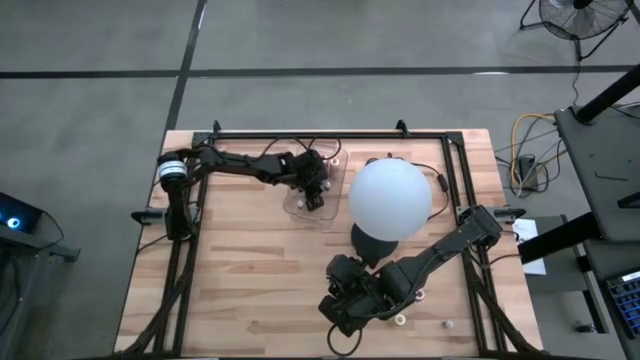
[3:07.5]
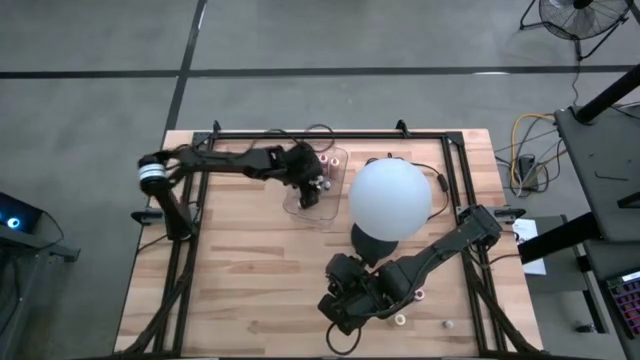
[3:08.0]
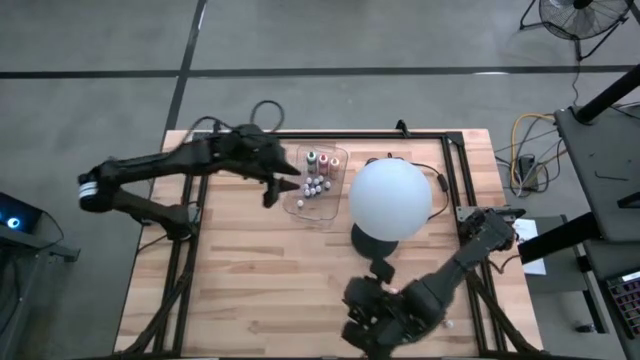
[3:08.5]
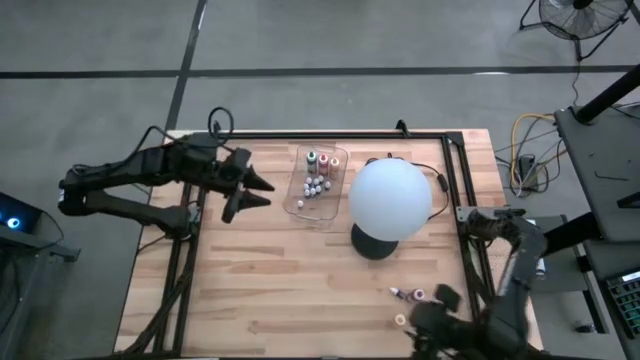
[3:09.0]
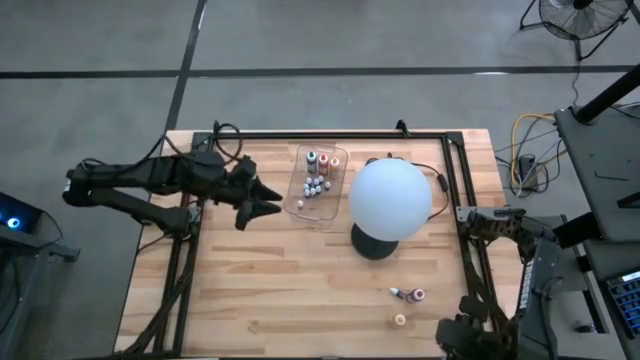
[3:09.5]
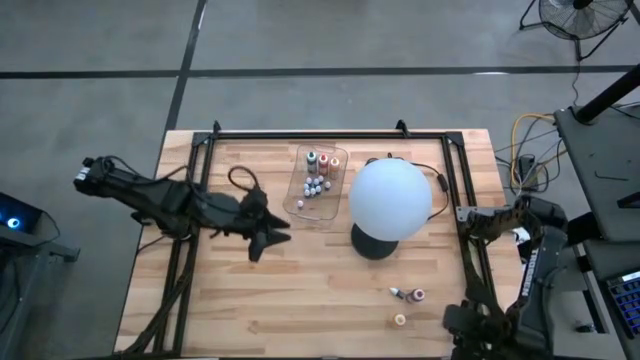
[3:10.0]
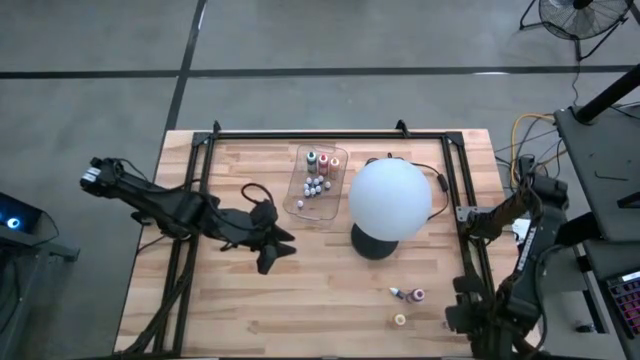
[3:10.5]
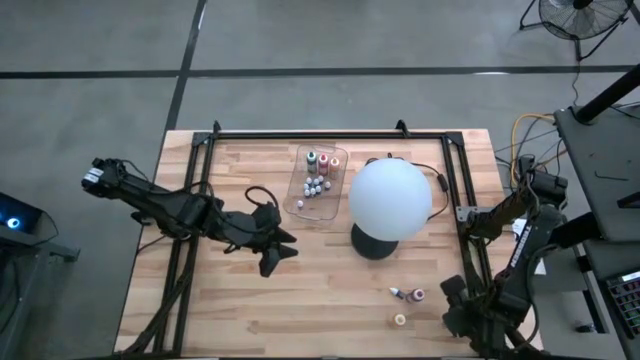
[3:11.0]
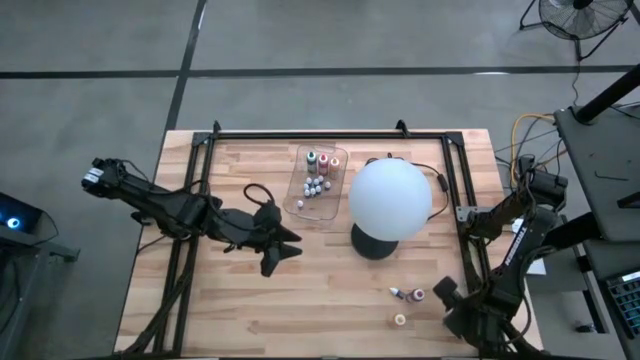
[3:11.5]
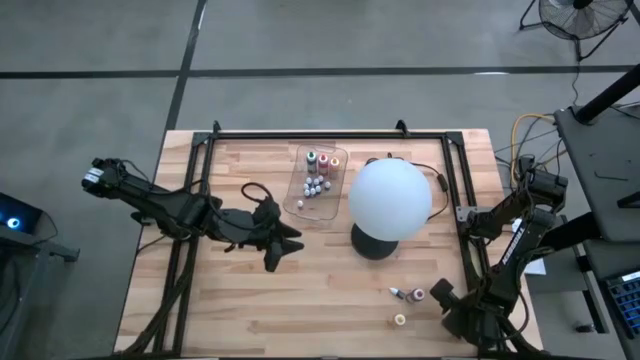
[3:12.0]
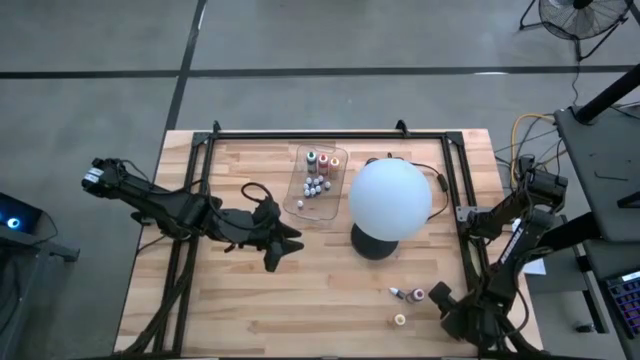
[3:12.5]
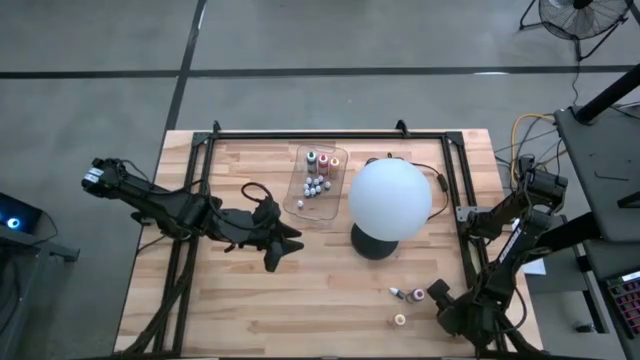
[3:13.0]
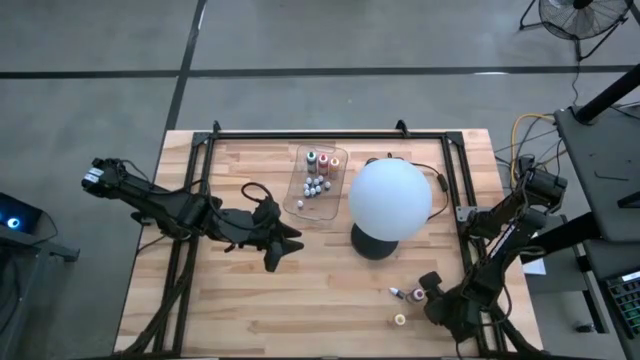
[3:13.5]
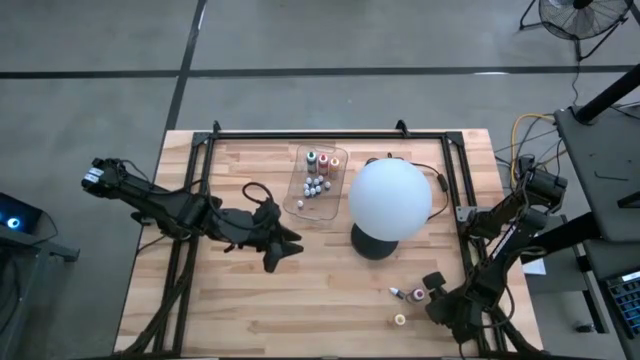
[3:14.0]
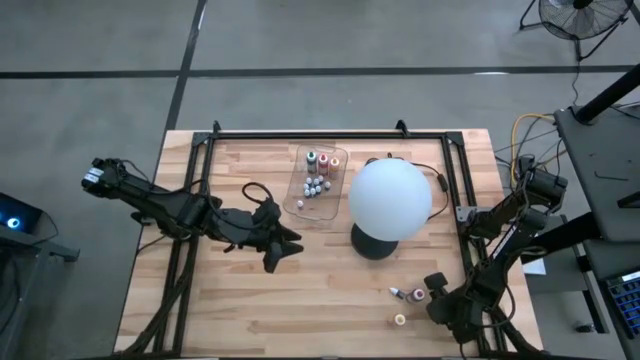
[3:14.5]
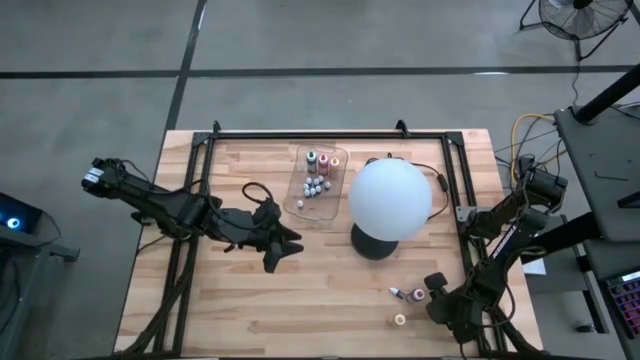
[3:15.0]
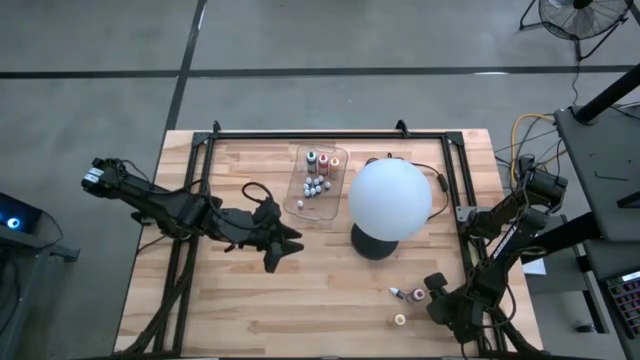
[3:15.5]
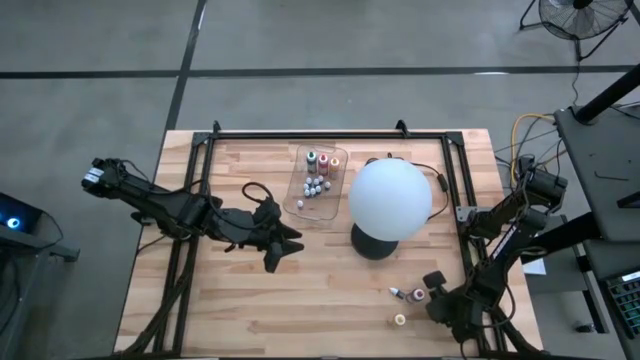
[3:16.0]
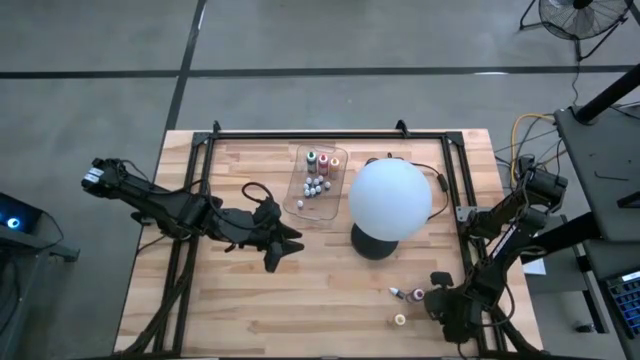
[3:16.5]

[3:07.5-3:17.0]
Task: Pick & Place food coloring
Put the small black food coloring bottle into the transparent bin

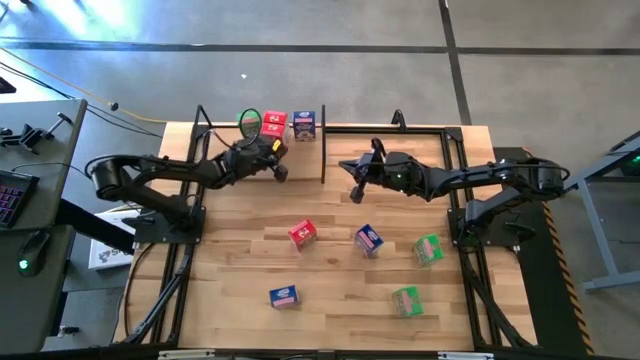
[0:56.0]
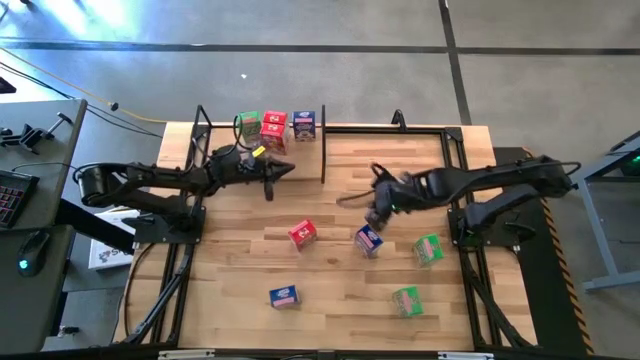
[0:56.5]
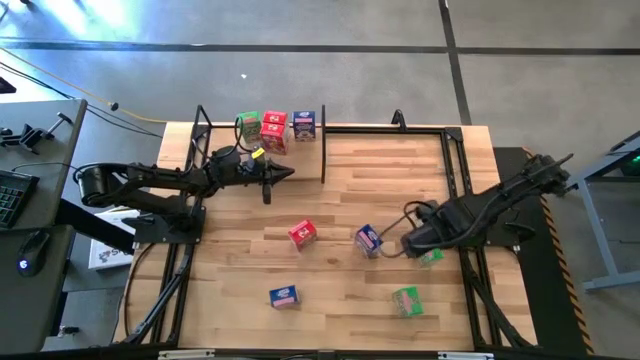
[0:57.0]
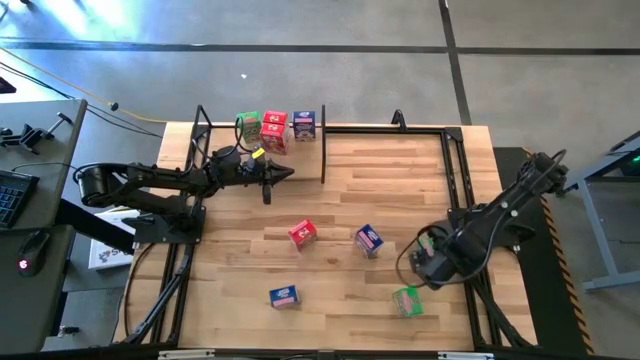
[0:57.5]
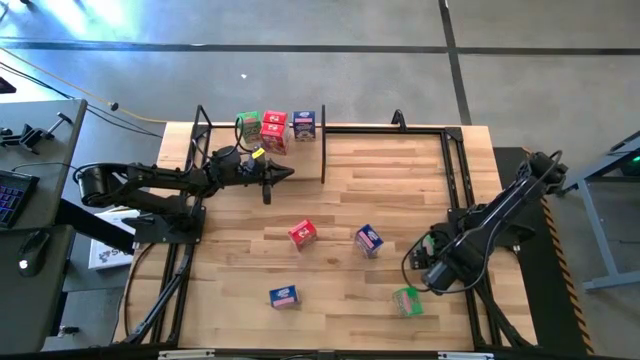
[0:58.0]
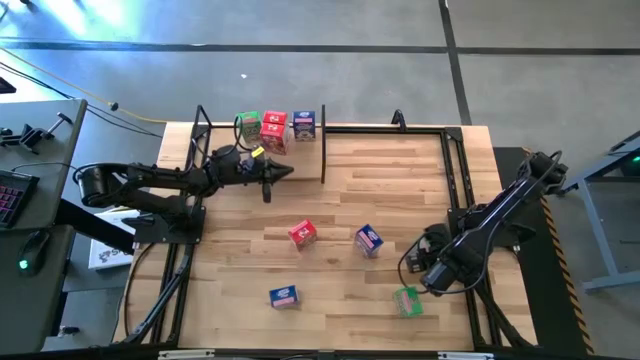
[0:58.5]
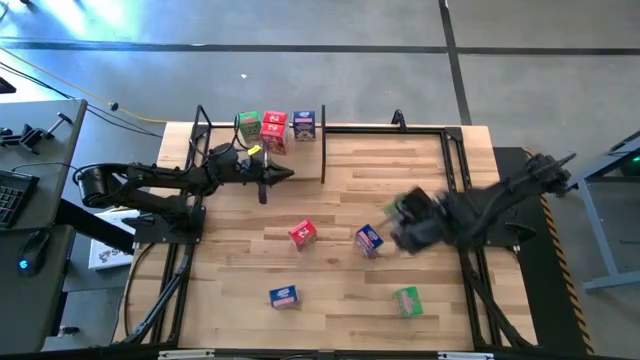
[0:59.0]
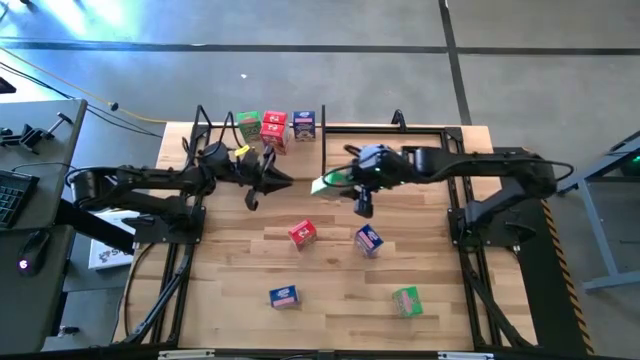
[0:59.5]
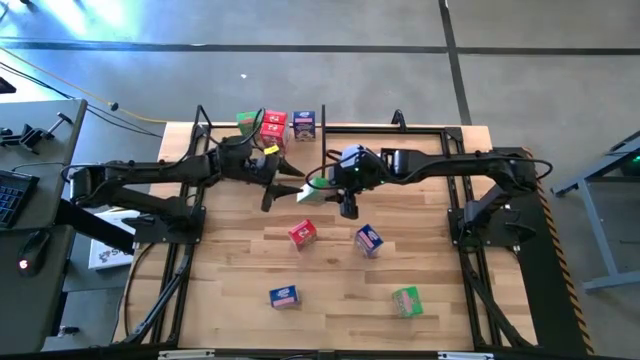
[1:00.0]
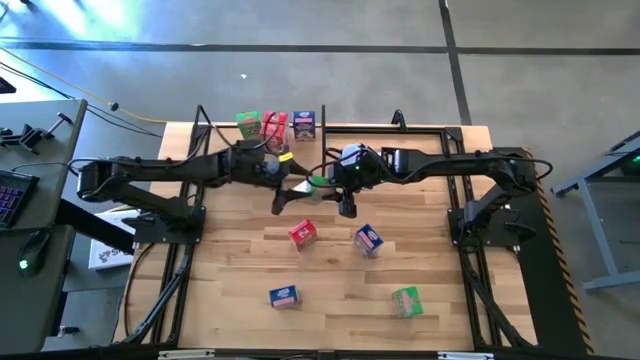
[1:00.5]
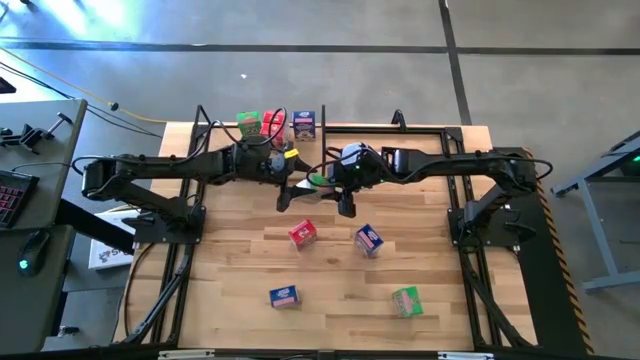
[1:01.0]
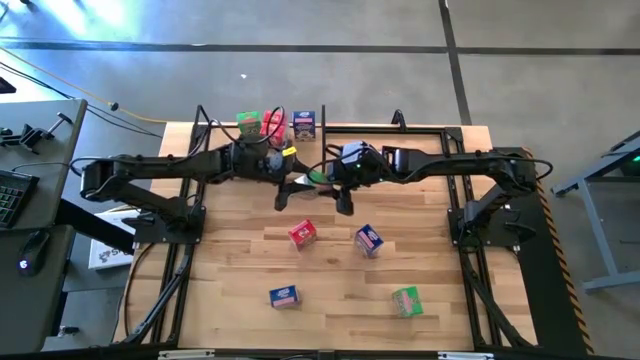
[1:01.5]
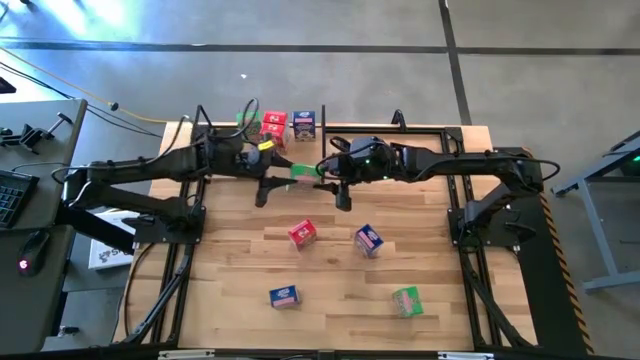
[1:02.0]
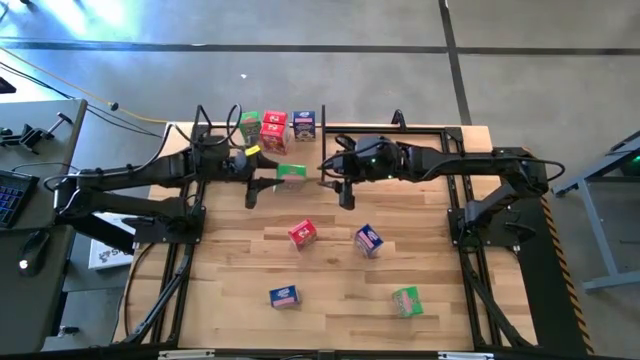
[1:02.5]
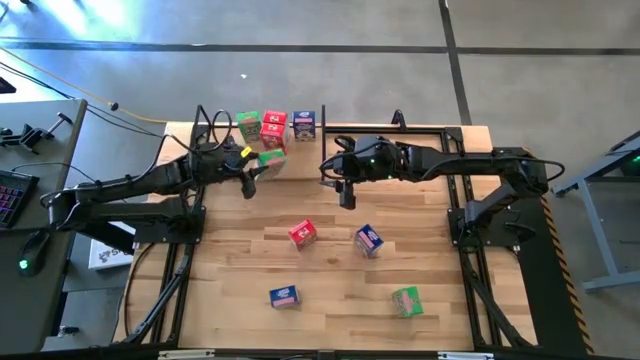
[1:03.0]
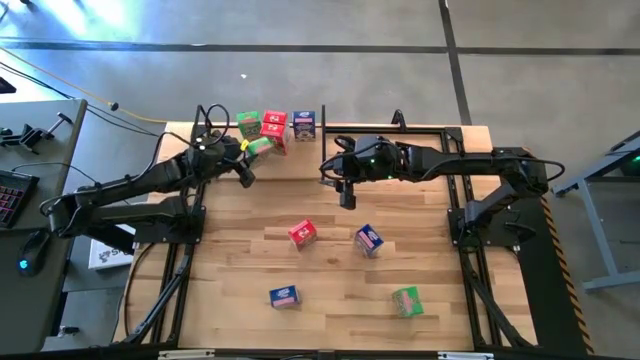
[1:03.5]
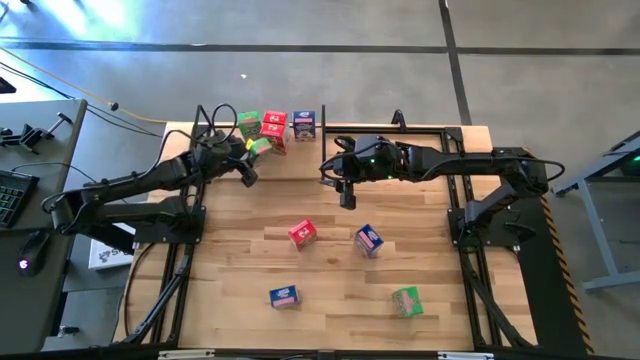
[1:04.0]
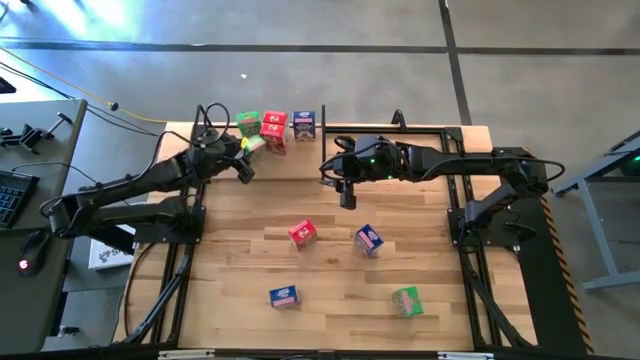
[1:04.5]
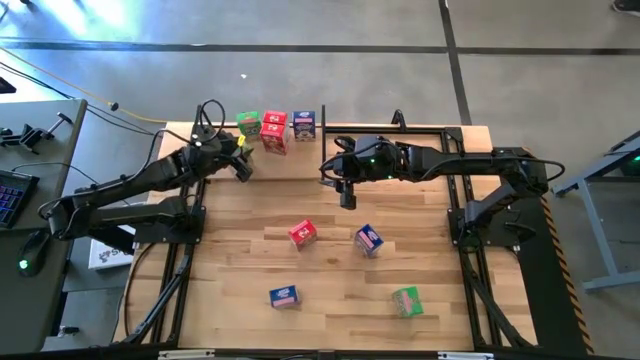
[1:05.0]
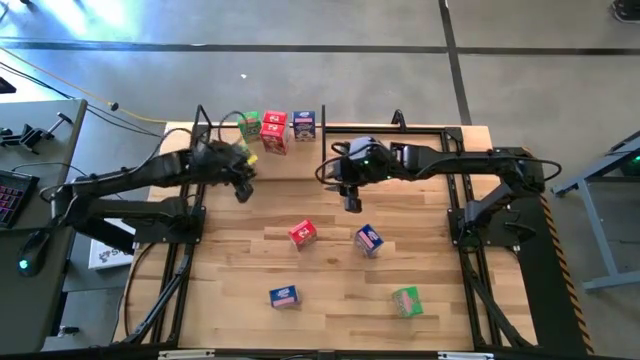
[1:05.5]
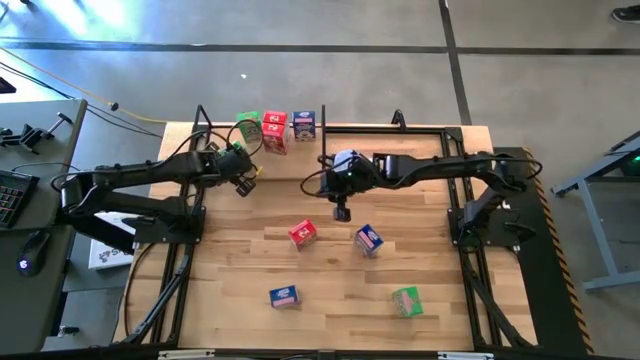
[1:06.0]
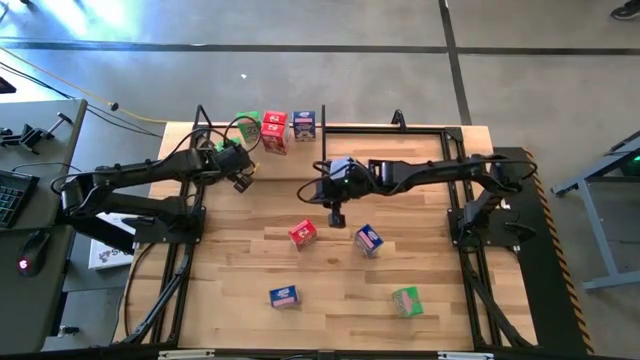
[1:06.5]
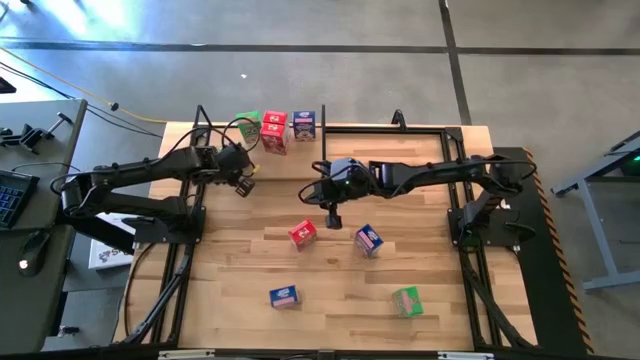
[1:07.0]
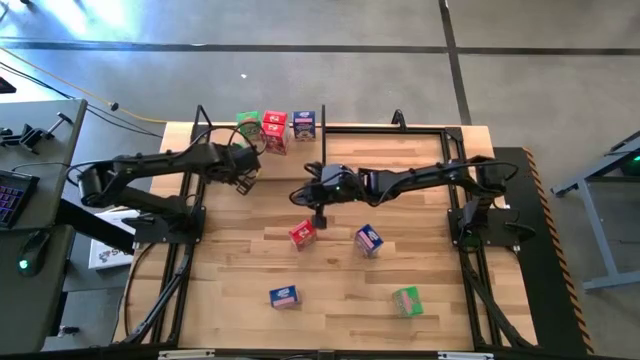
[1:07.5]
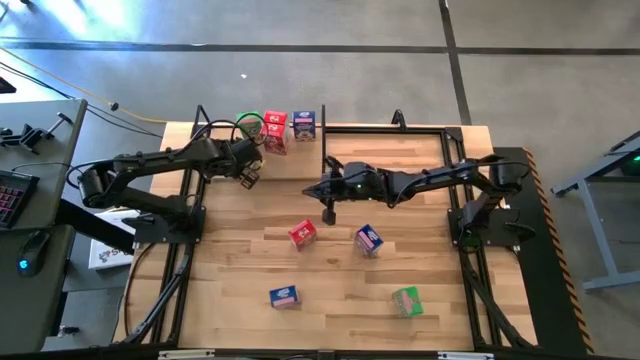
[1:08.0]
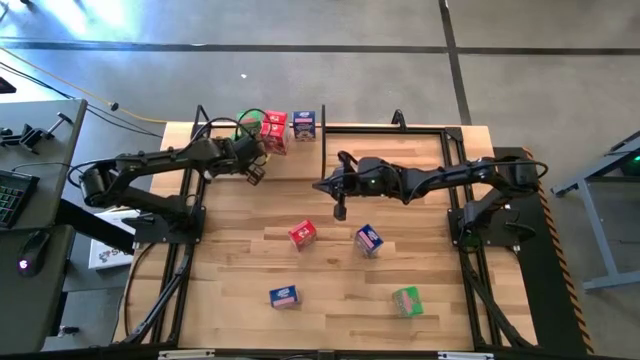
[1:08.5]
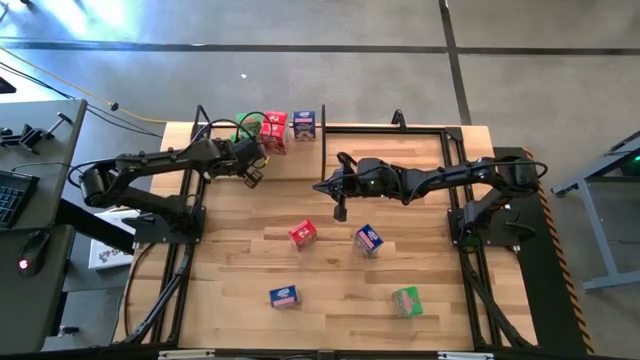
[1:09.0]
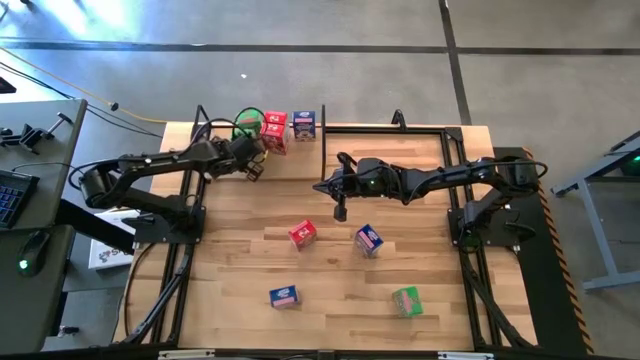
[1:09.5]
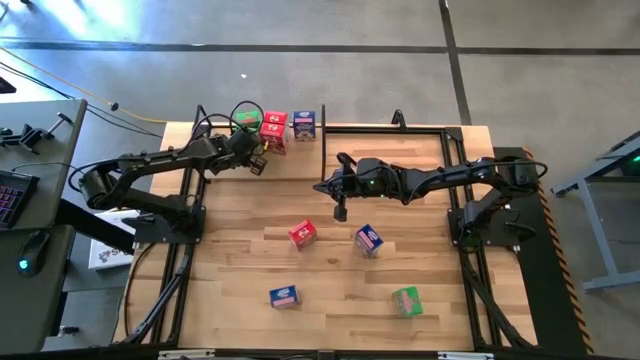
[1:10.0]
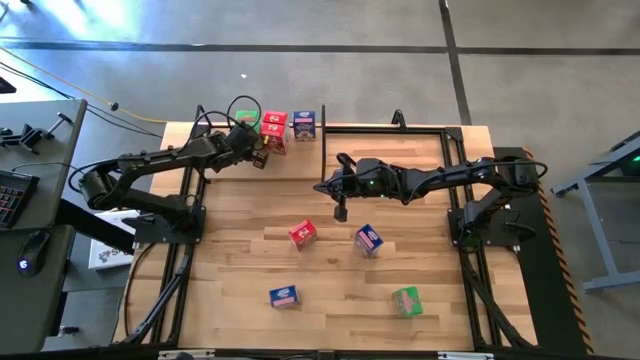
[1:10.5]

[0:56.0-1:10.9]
Task: Stack cereal on shelf
Put the top green cereal box on the shelf aligned with the green cereal box
